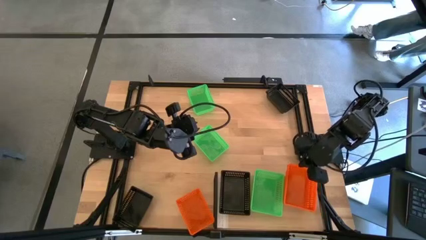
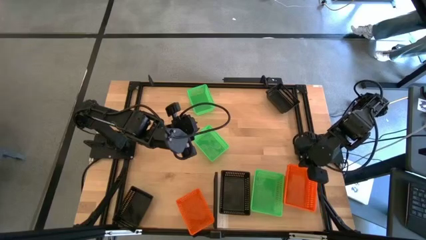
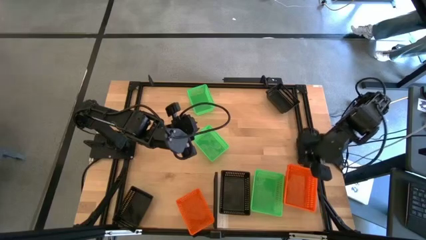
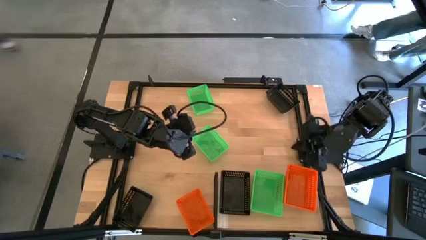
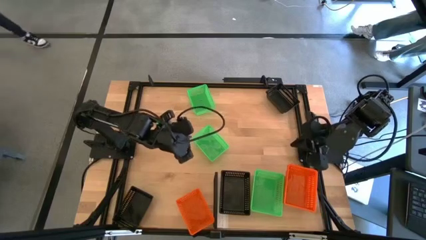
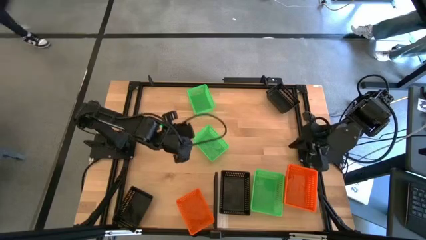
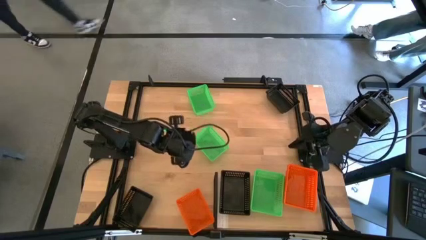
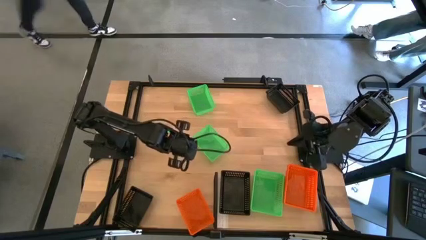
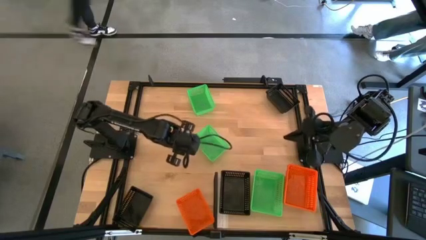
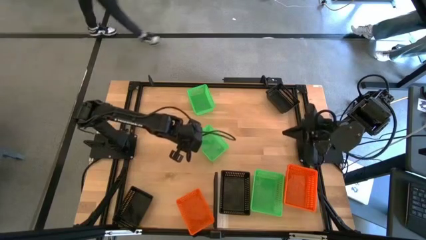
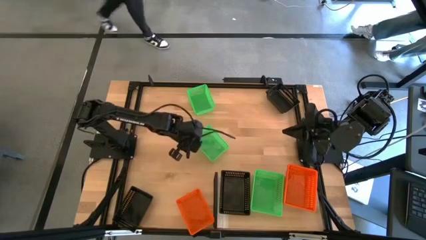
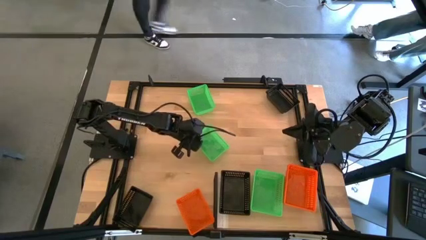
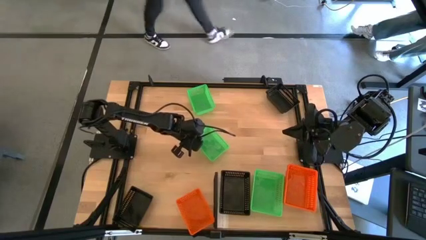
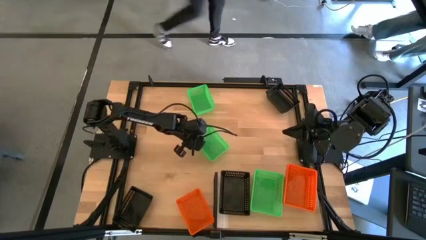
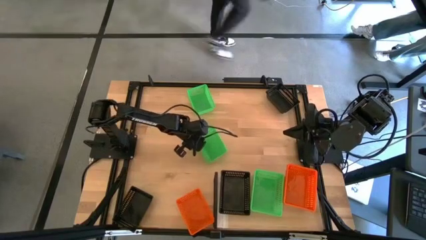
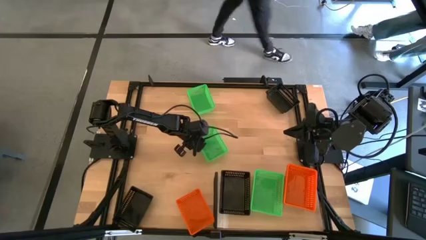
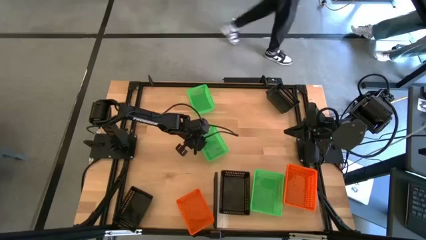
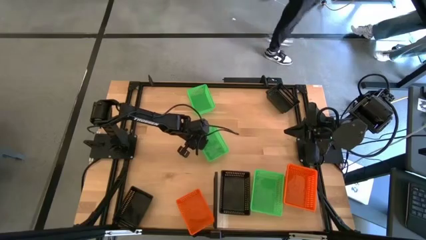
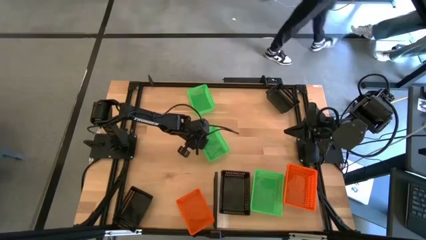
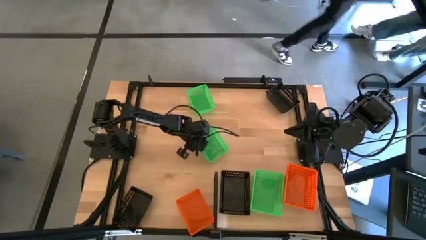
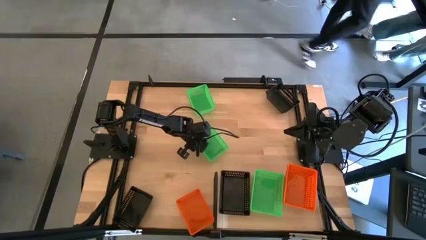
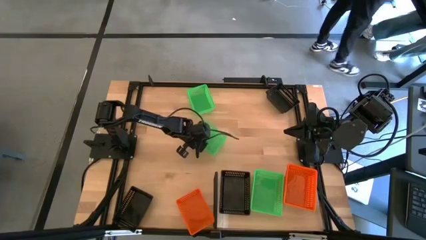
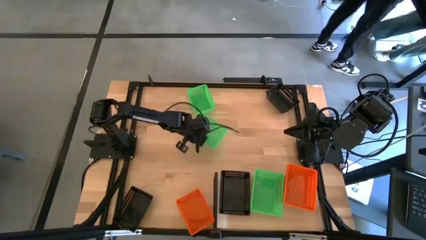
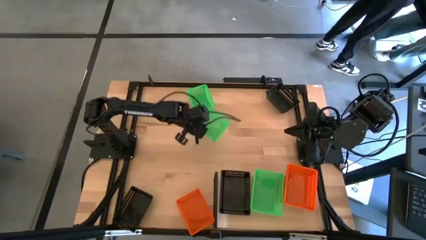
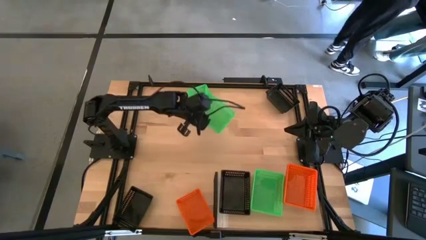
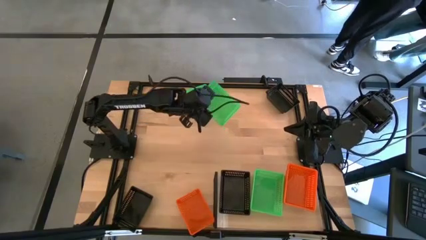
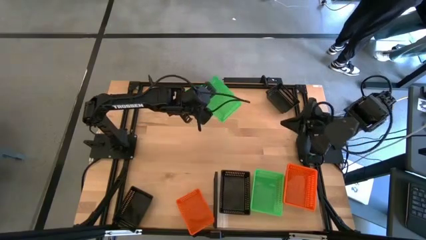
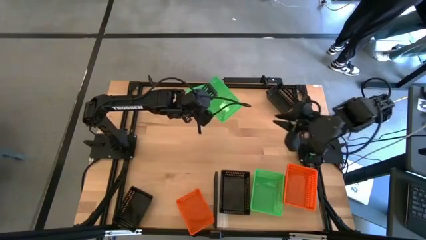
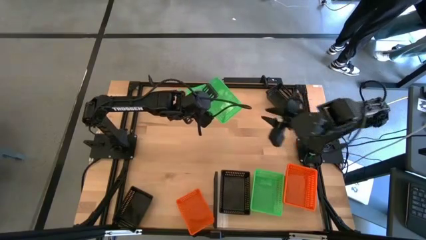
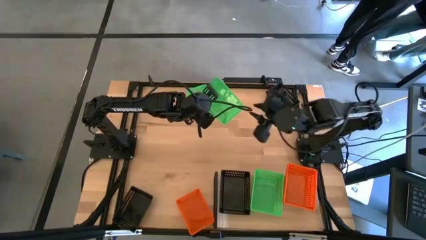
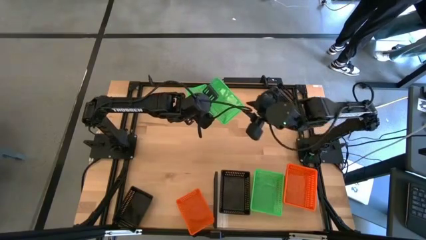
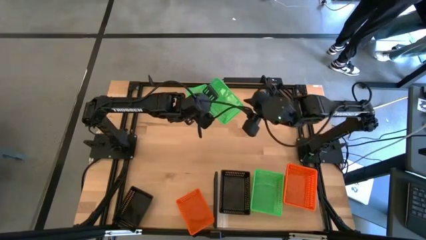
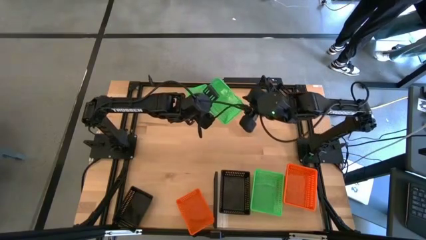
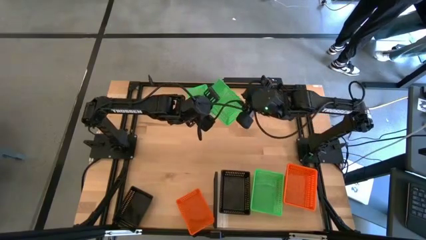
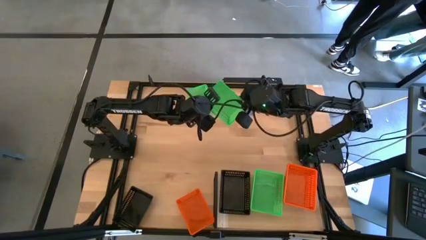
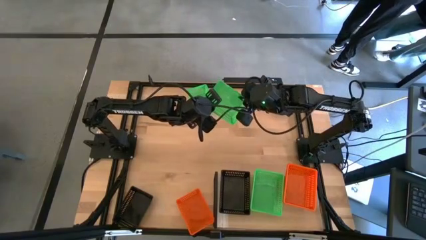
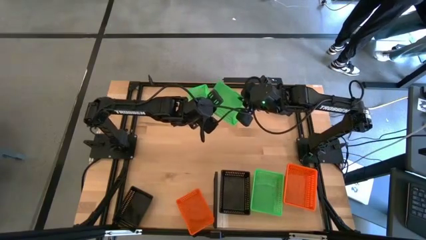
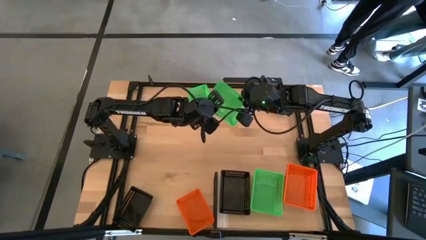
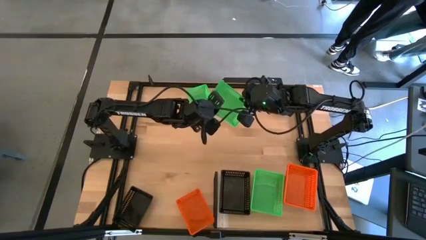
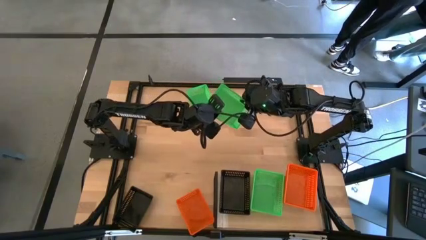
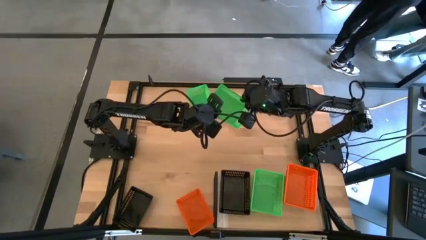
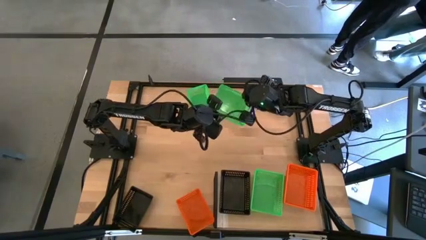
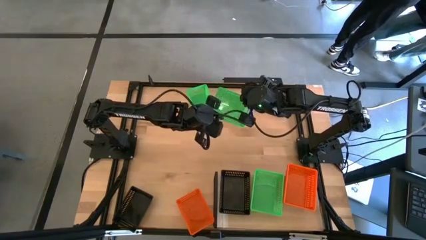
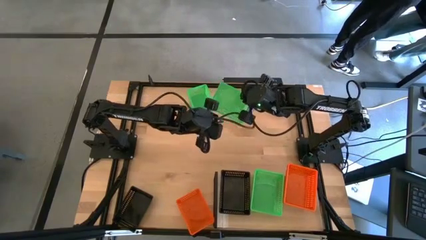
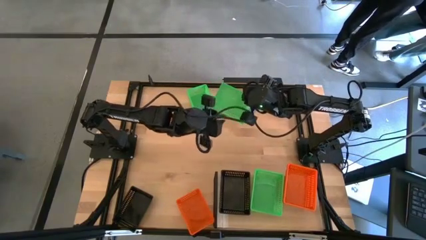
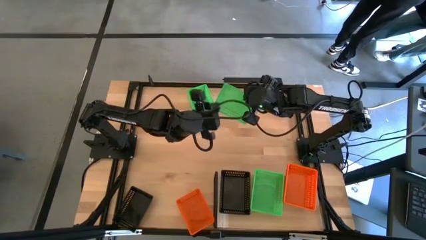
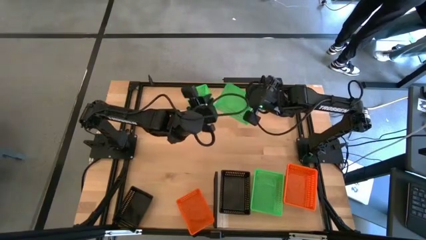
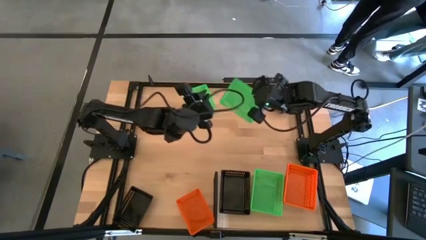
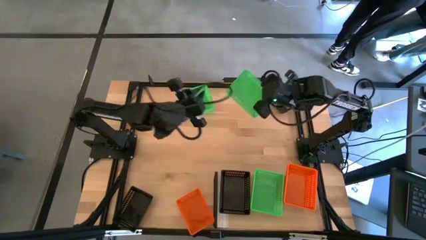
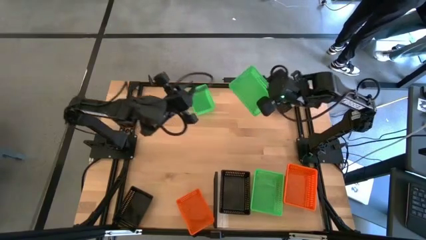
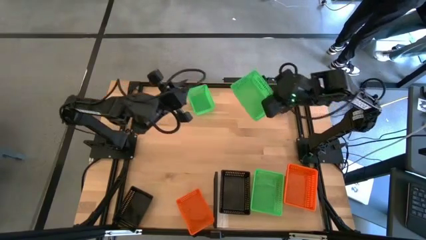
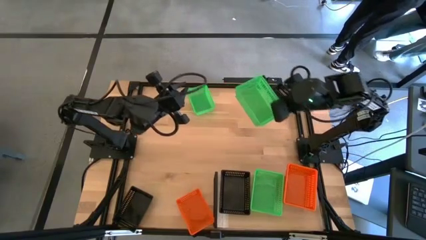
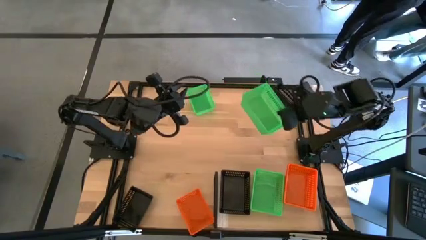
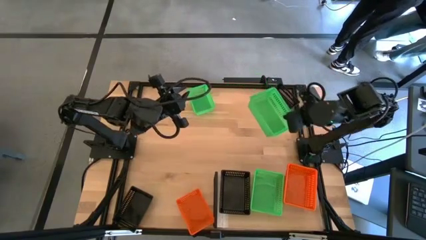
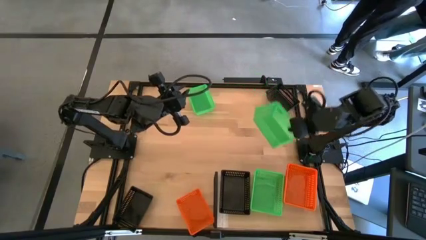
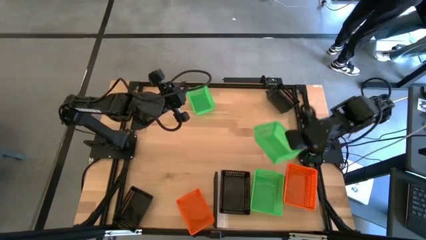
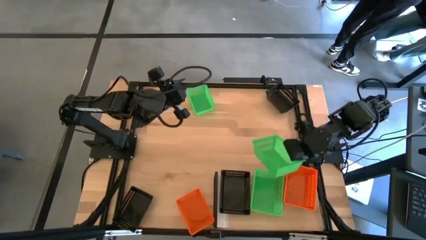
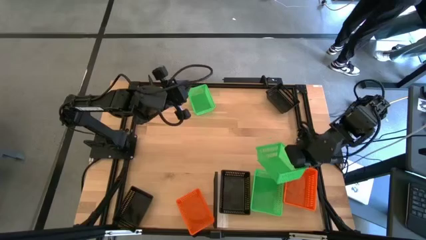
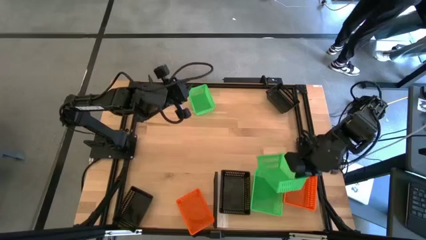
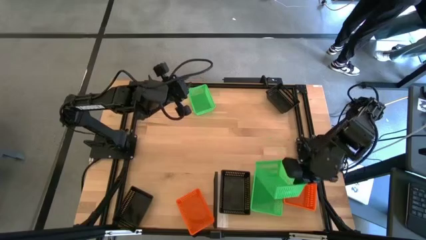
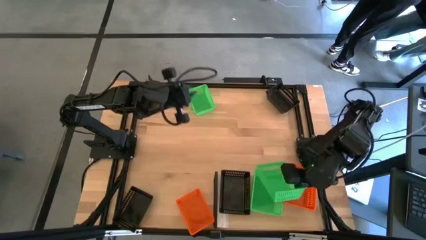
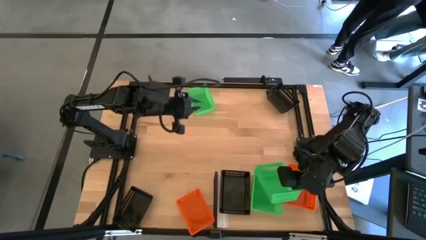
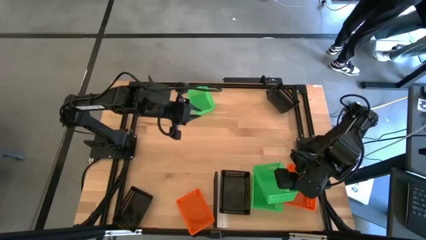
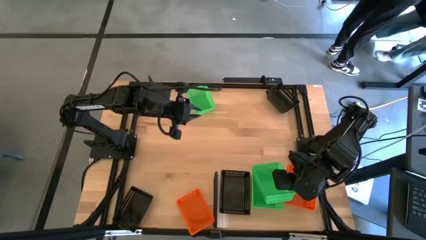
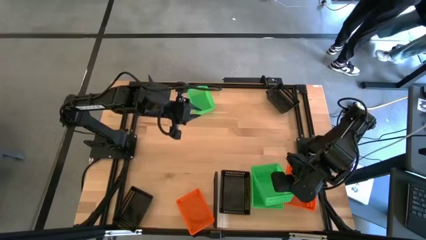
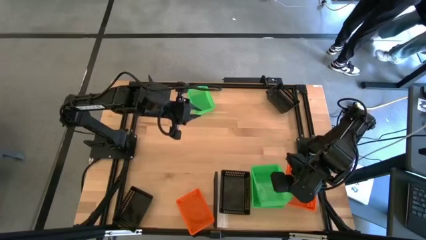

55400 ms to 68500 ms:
Task: Stack baskets on shelf by color
Stack the bottom green bin on the green bin on the shelf

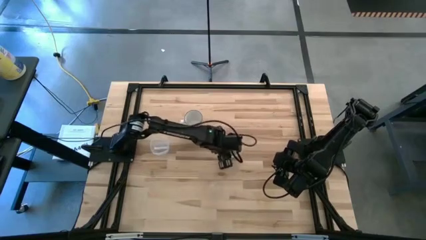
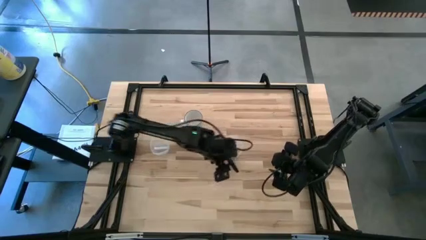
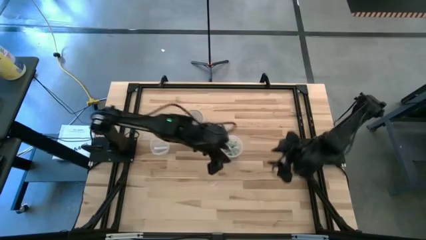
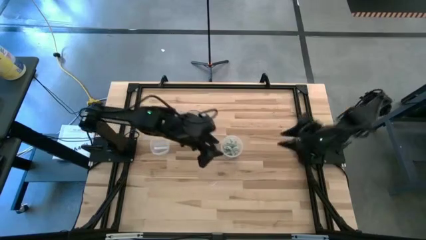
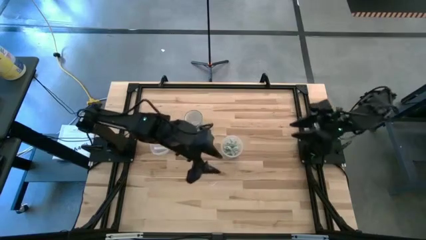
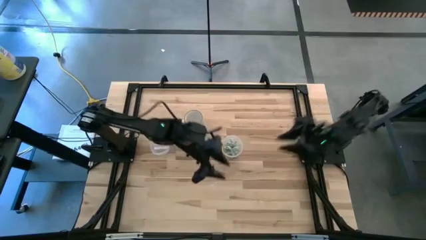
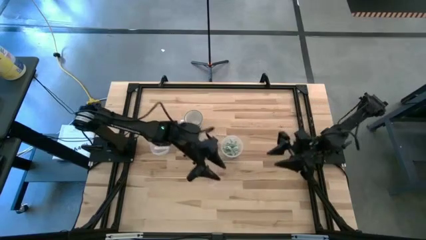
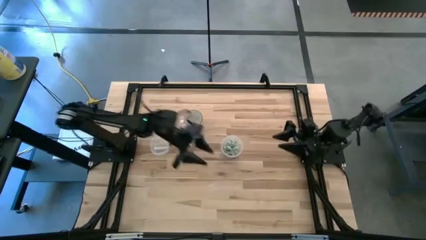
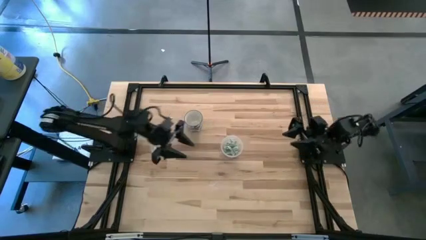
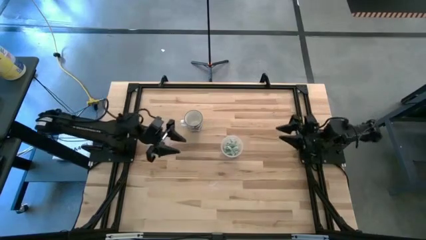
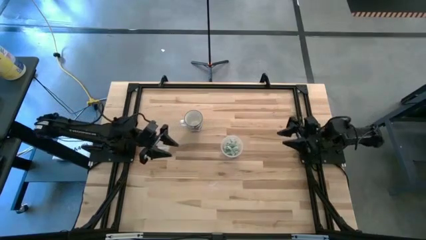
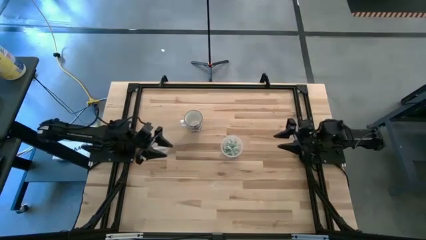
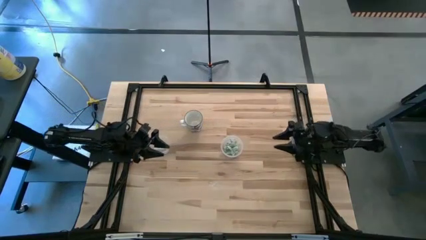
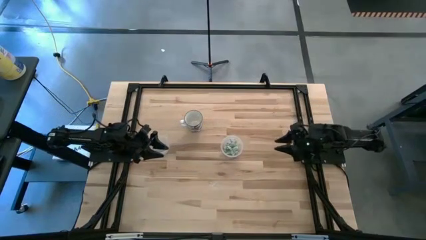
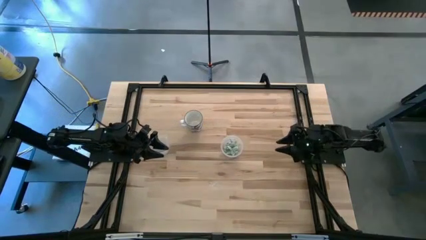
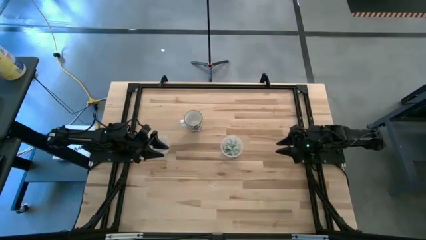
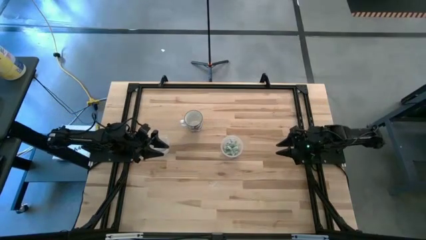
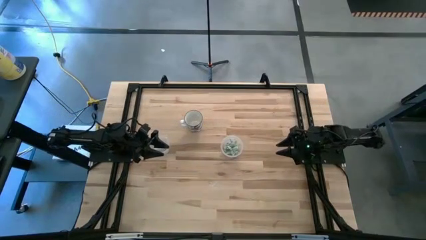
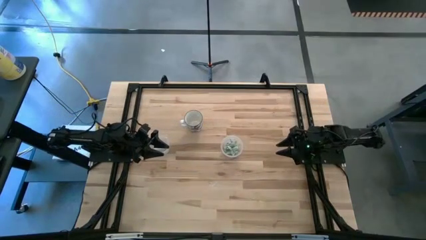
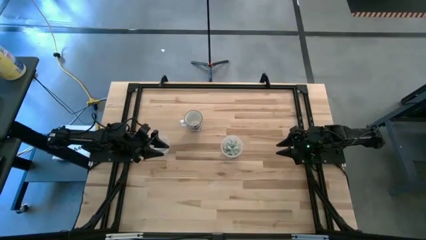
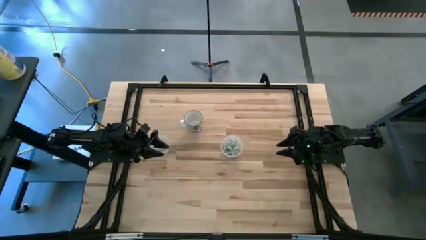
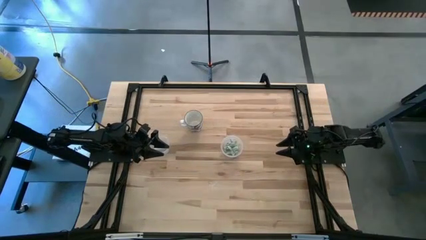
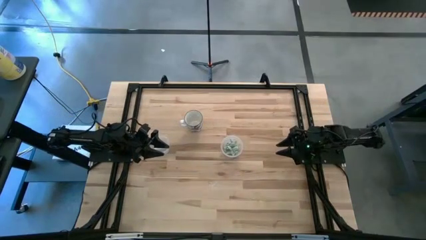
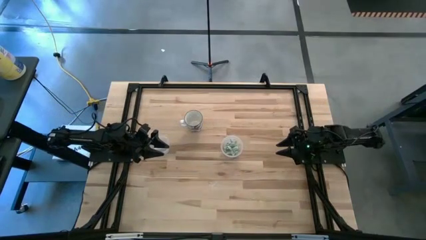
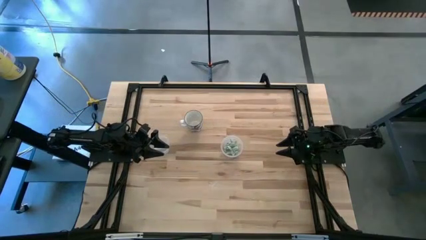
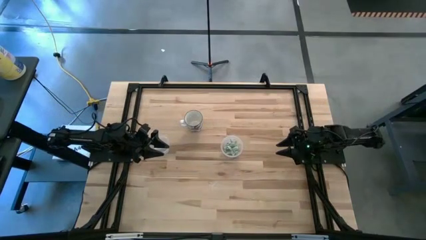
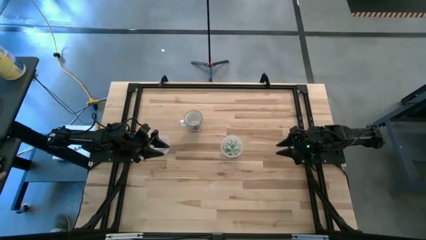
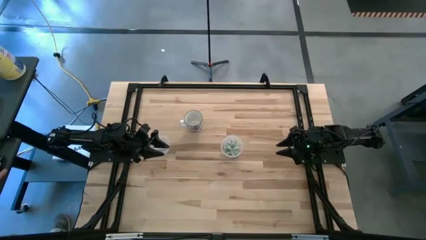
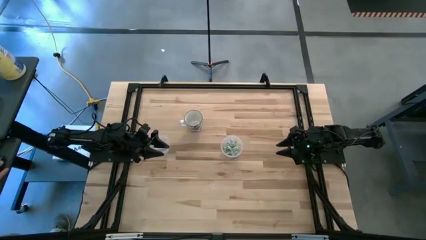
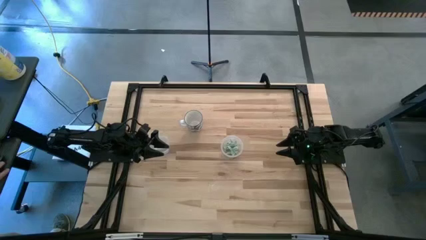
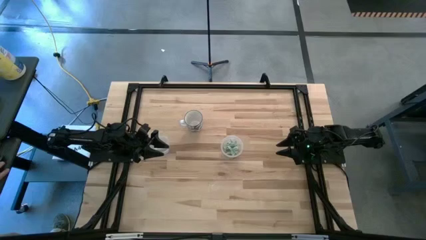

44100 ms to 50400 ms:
Task: Pick and place Stevia / Truvia into bins
Return to Home Position
